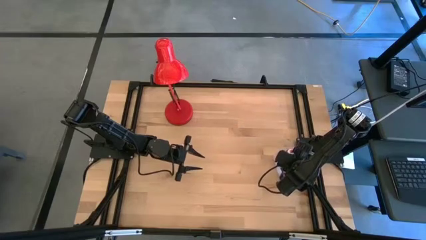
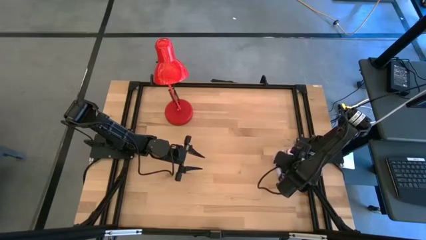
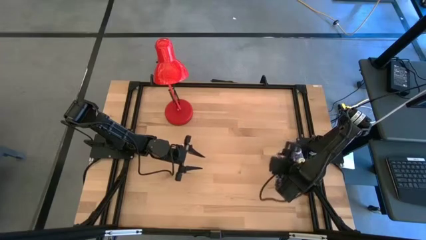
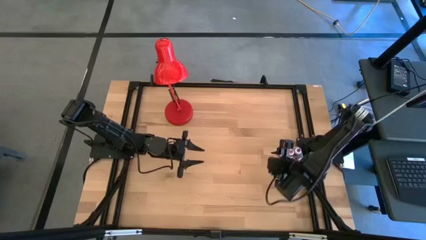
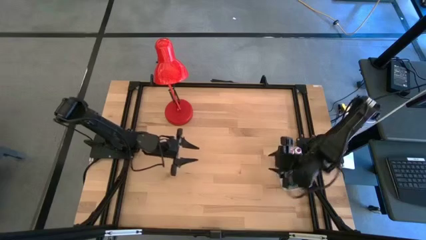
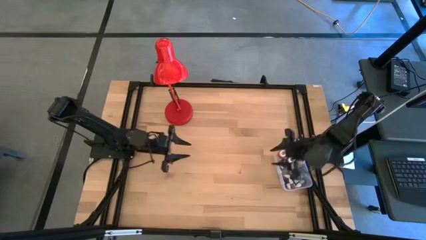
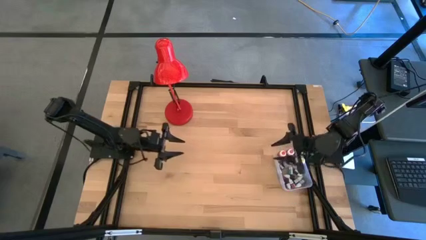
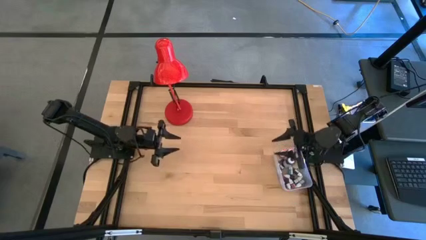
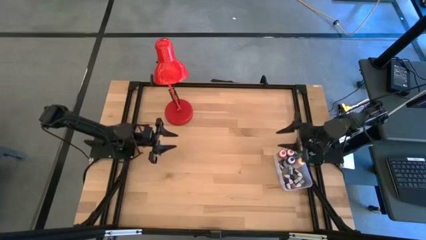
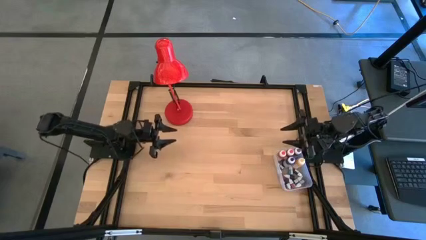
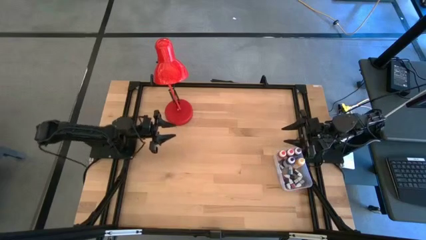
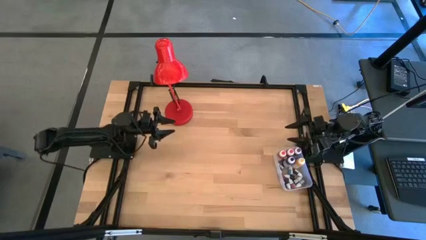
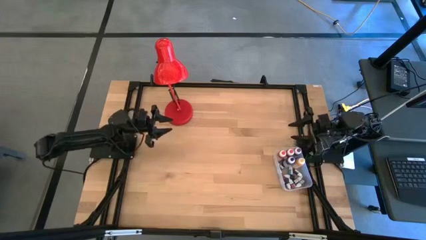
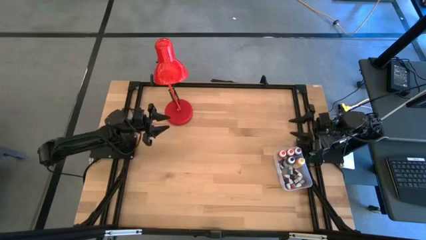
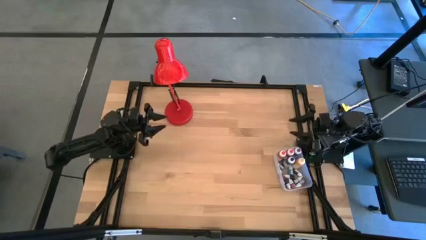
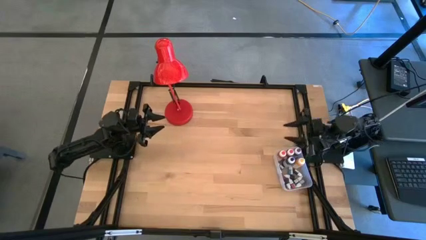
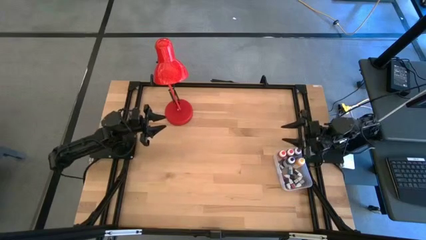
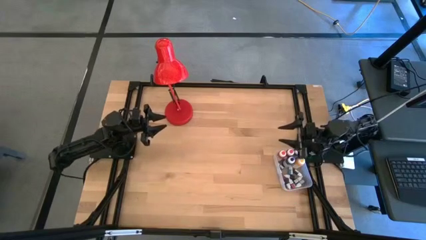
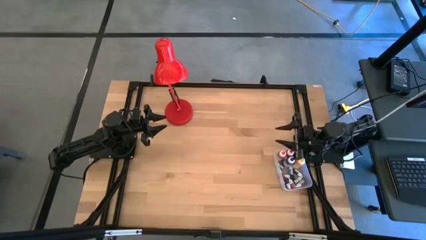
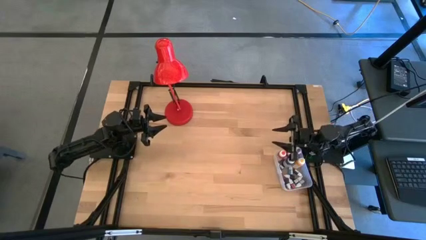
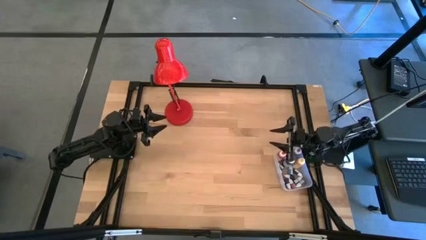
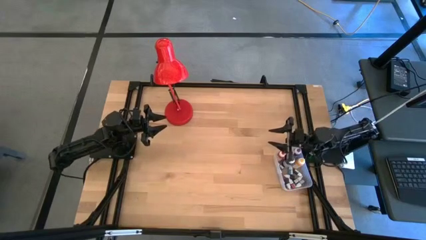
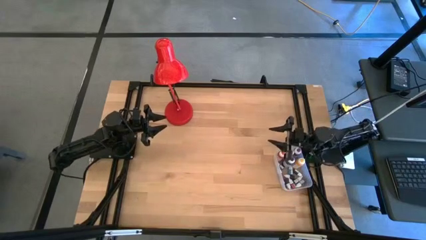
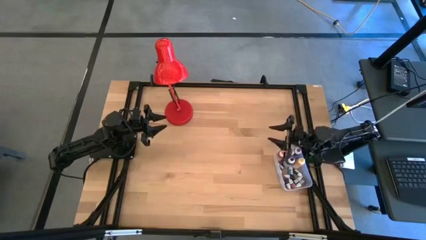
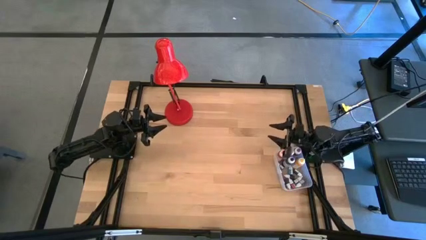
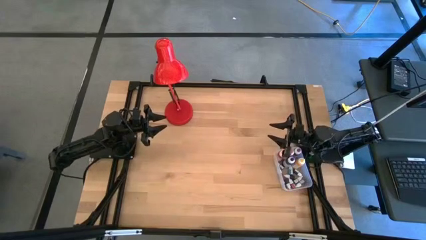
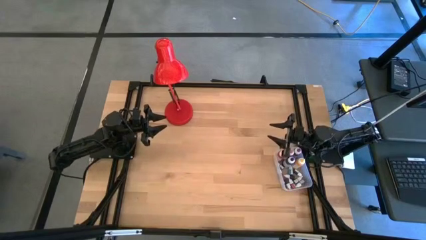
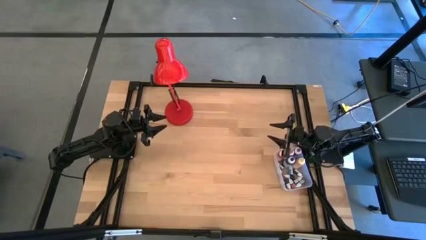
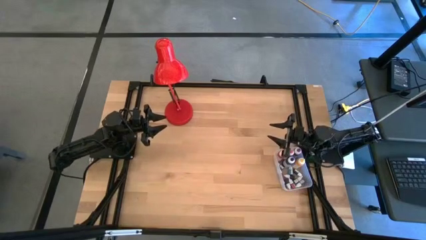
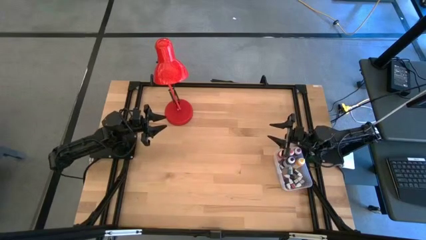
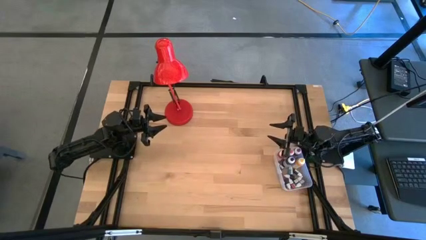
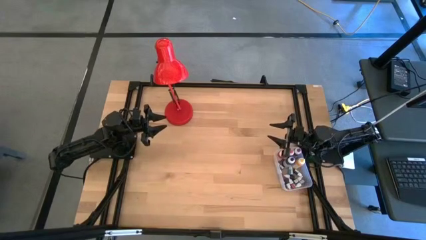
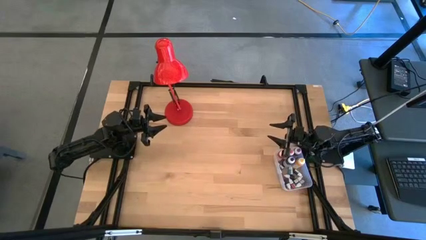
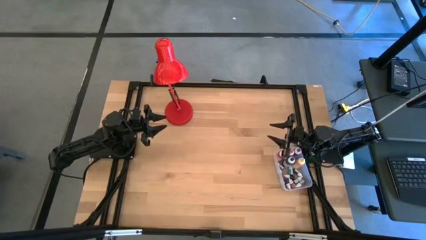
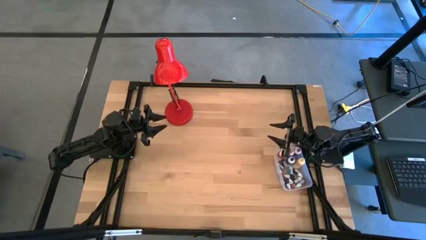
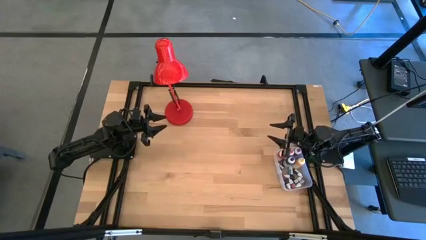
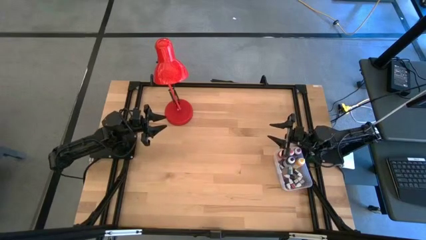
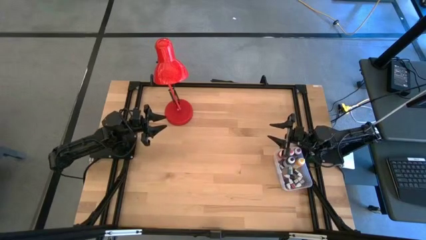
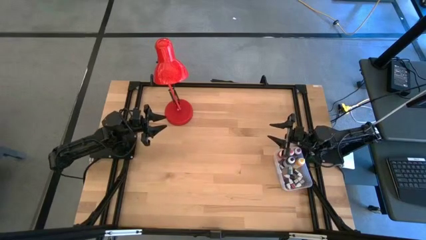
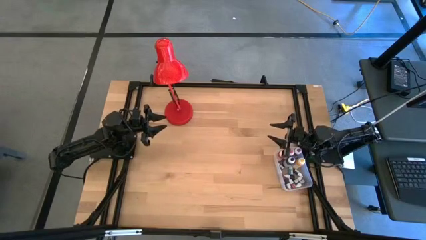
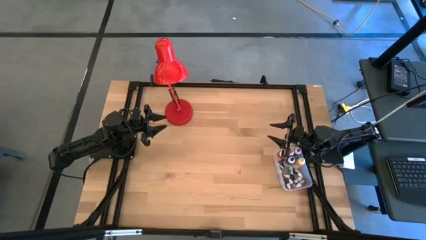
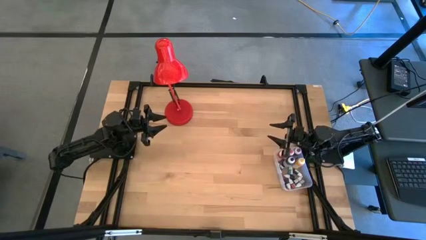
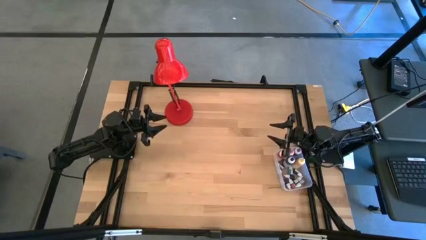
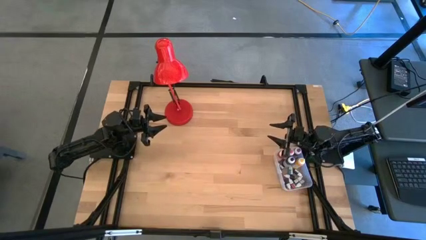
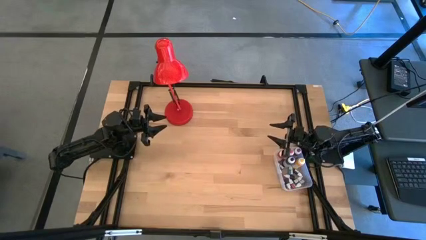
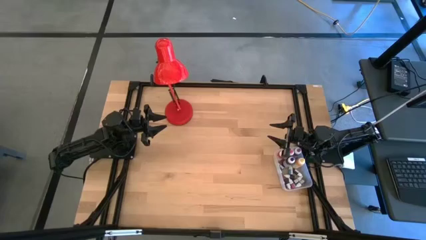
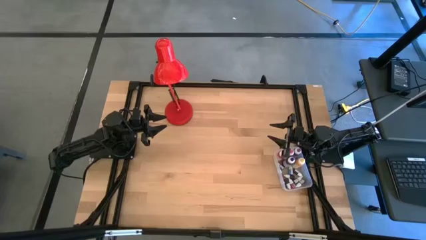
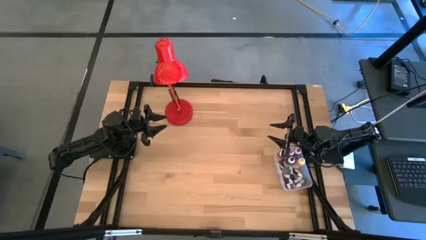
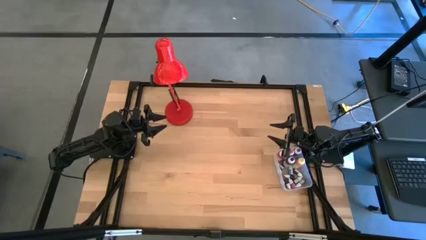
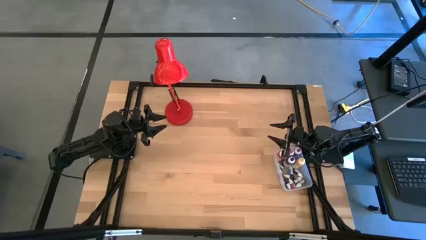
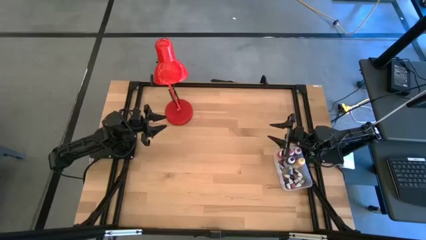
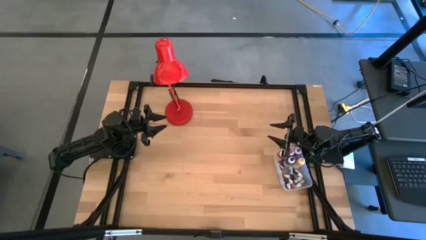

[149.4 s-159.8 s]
Task: Pick & Place food coloring
Return to Home Position

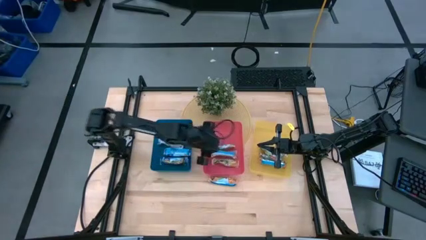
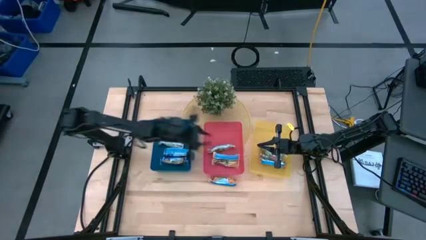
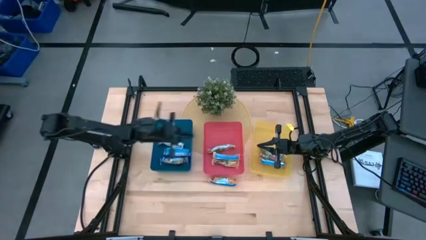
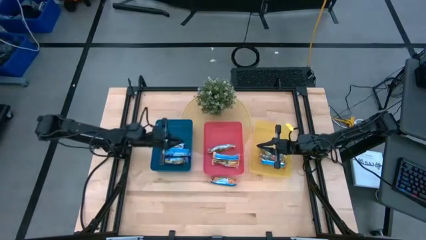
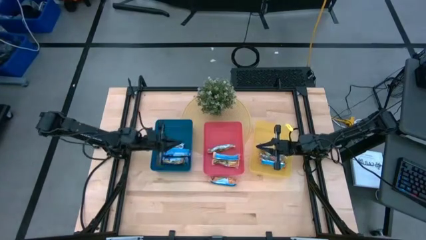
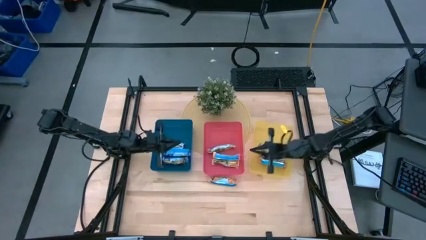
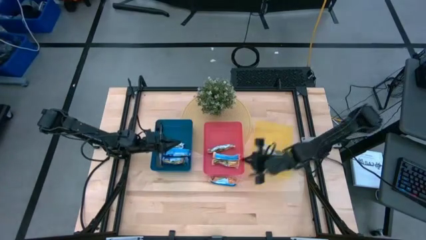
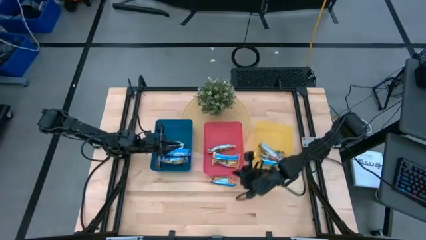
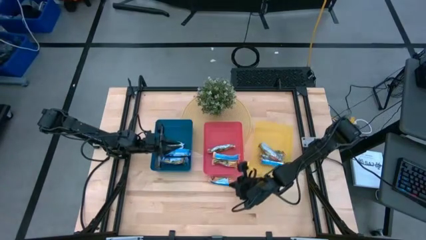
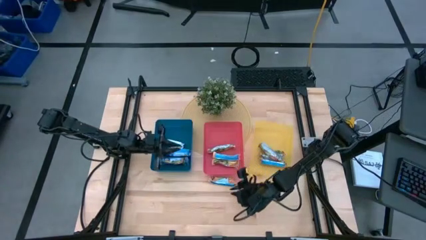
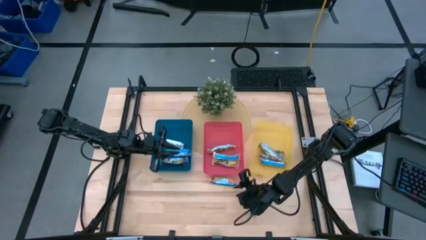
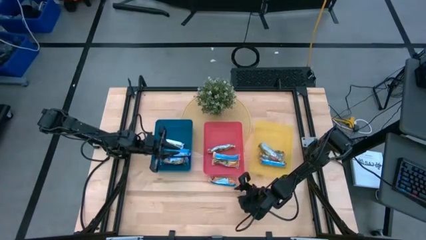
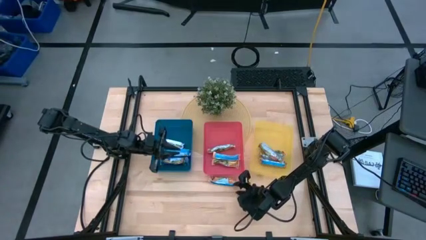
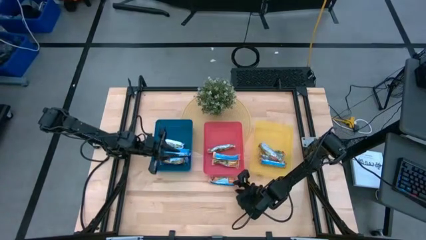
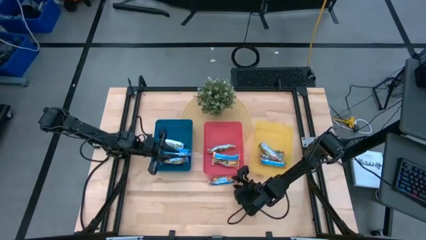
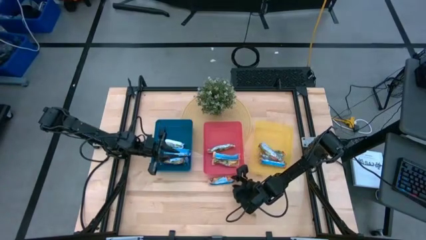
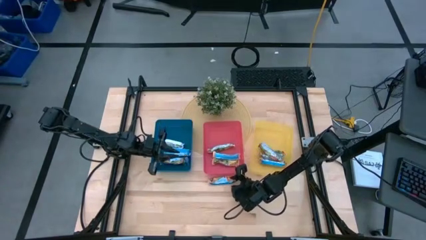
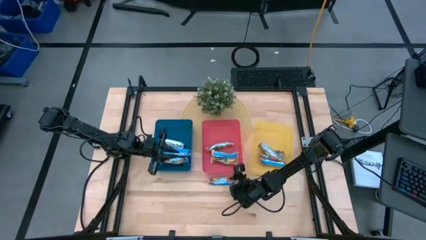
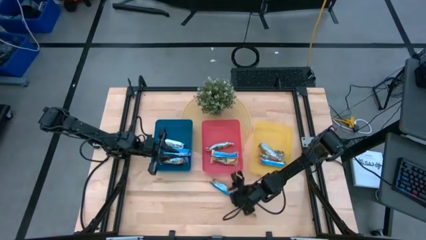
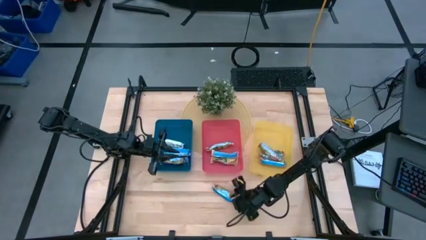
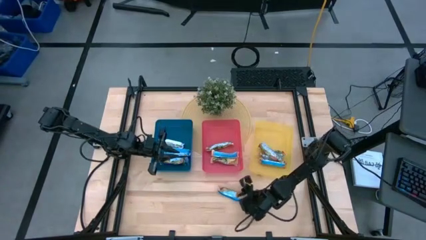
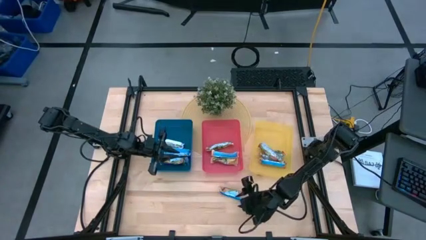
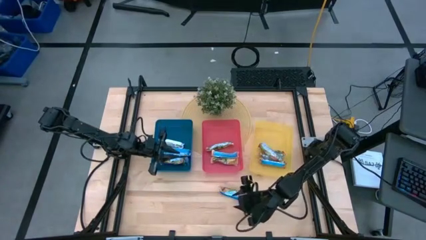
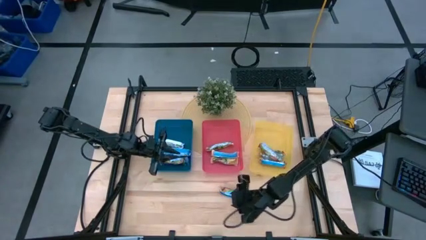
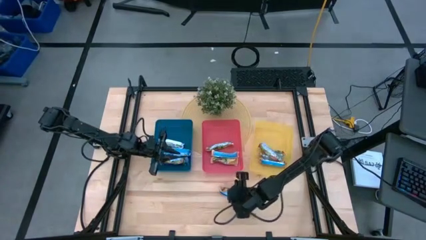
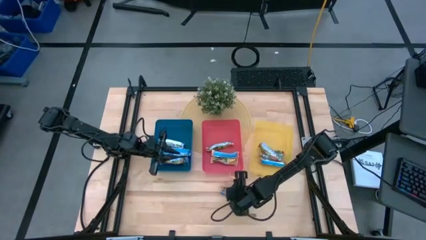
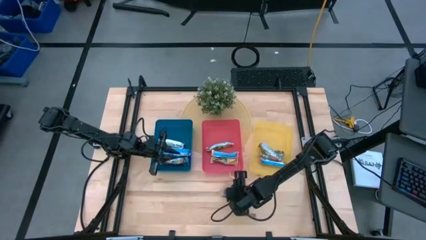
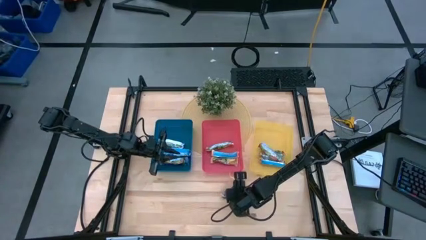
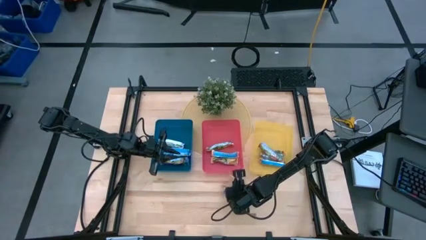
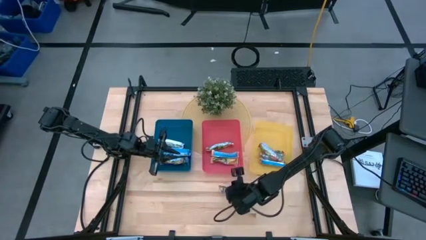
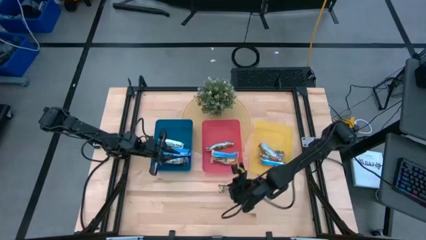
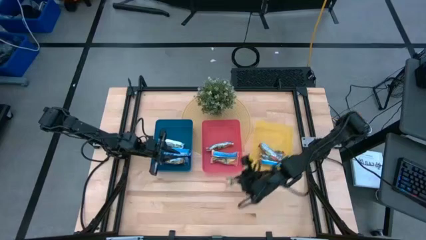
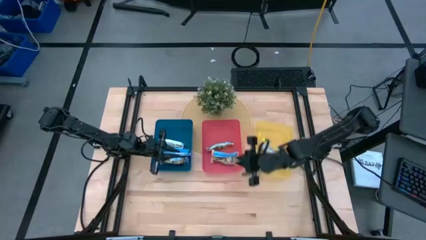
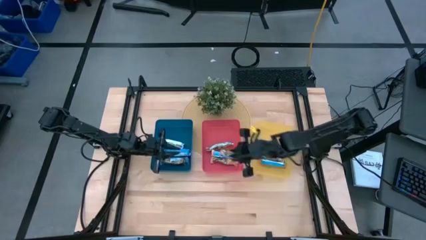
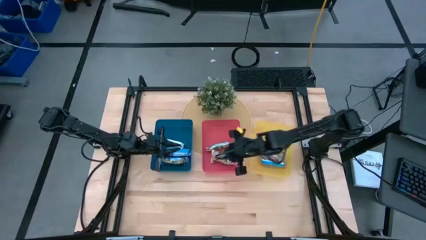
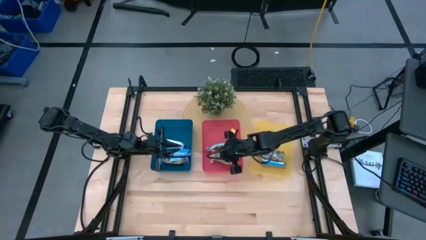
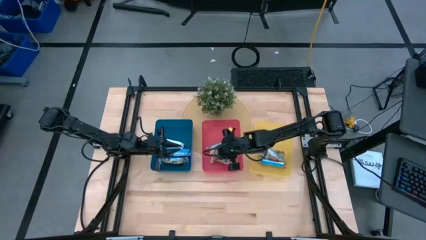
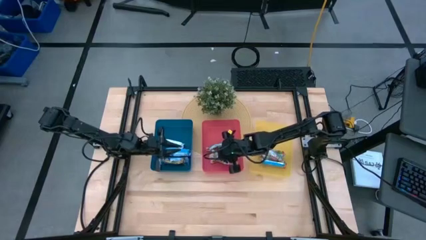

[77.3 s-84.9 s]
Task: Pick and place Granola Bars by type
Put the yellow granola bar into the red bin
